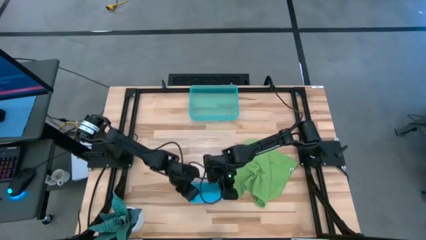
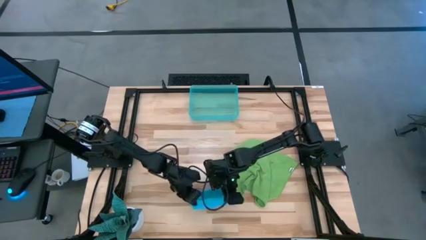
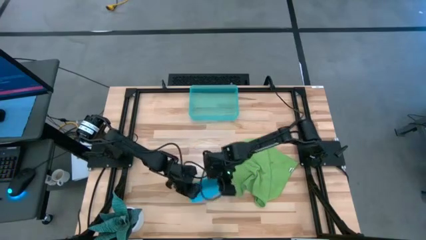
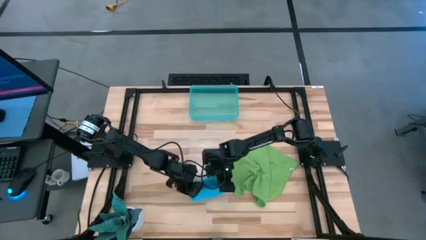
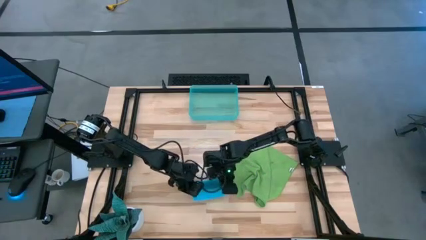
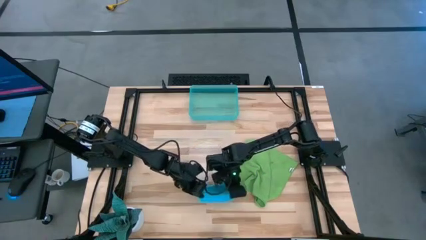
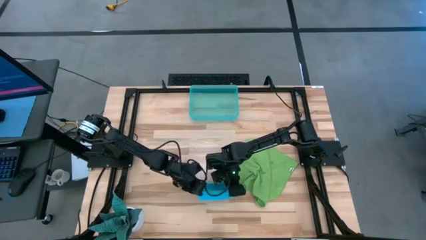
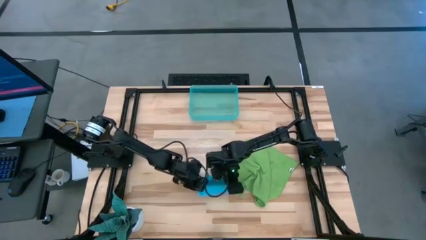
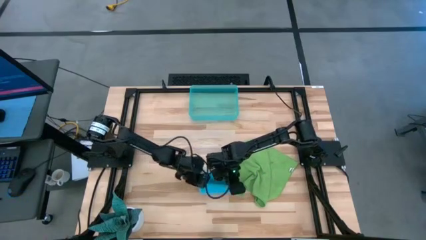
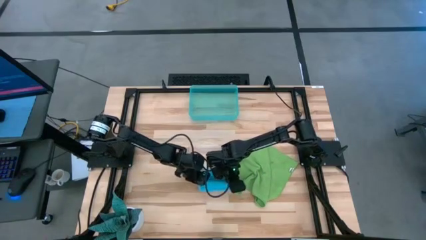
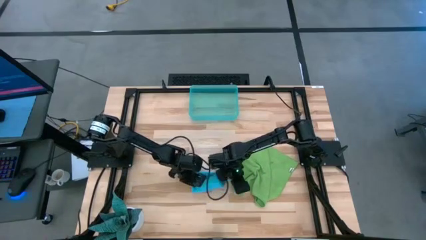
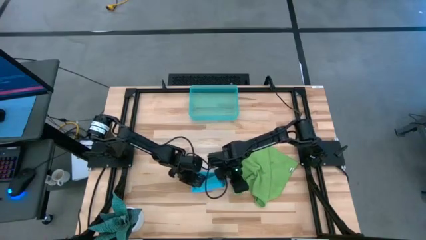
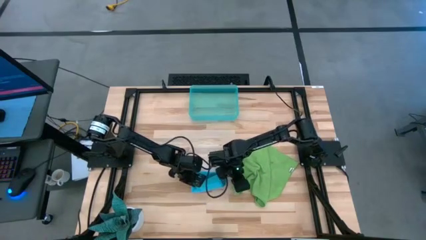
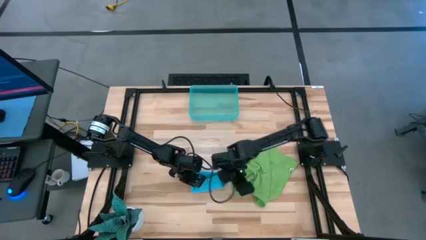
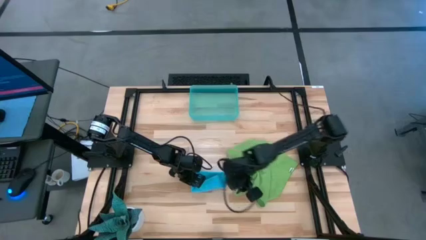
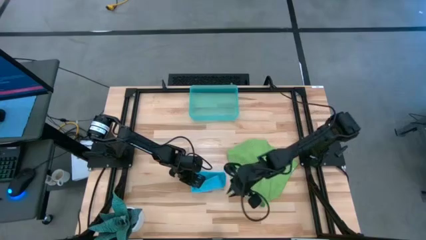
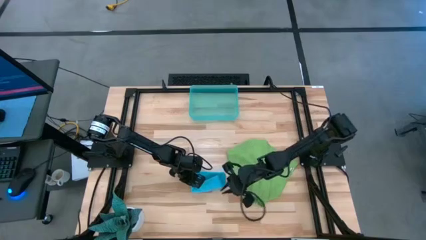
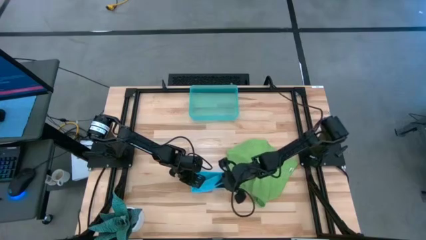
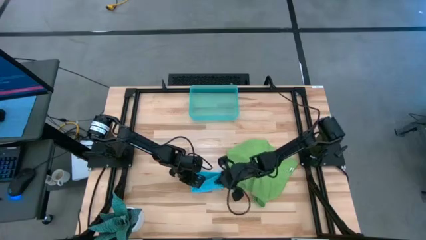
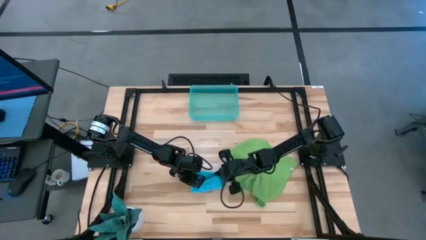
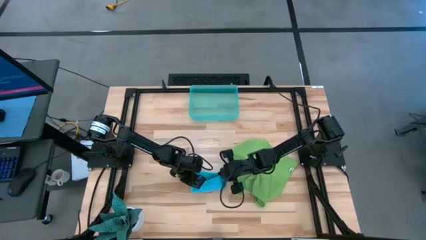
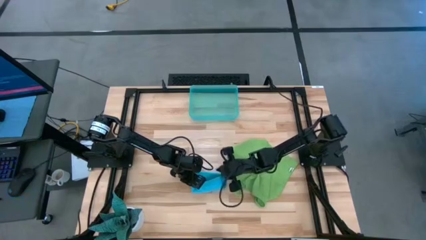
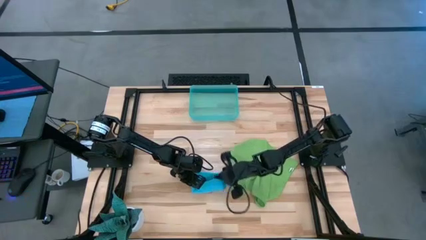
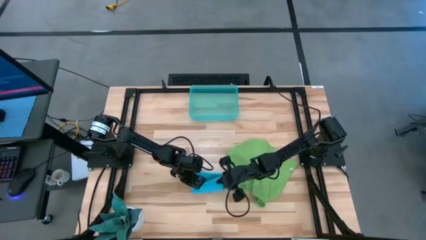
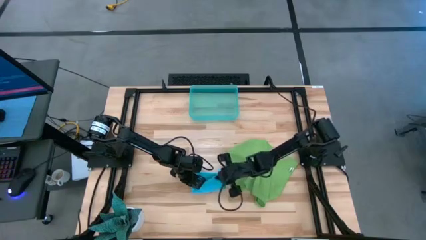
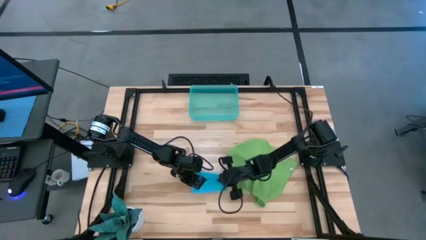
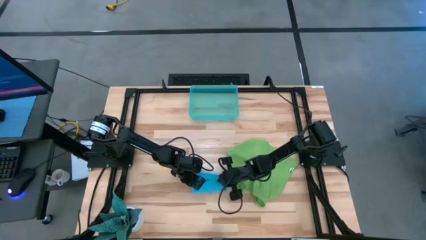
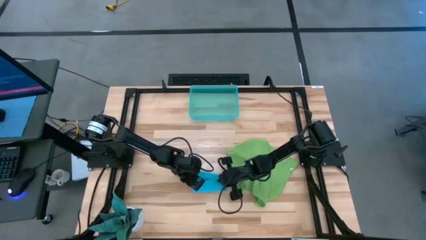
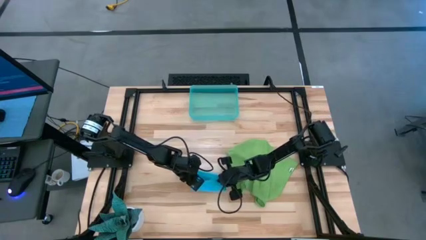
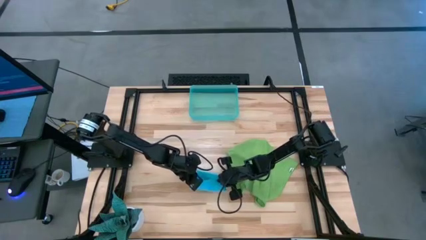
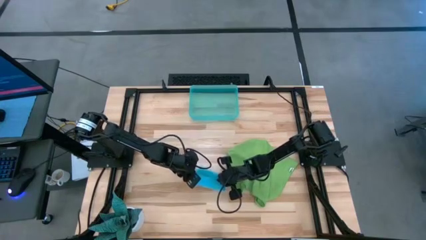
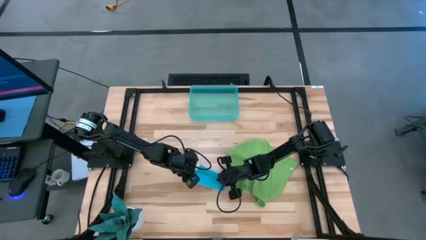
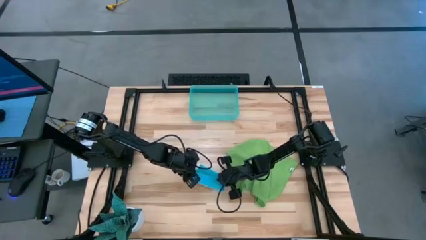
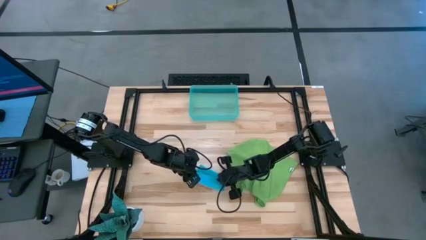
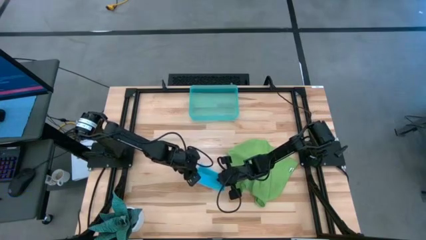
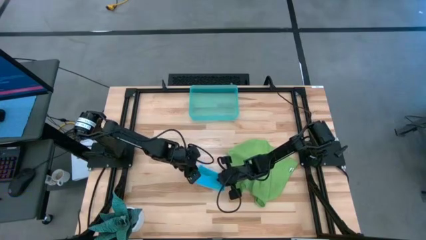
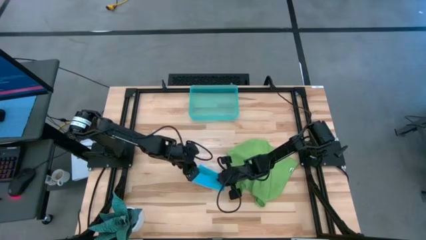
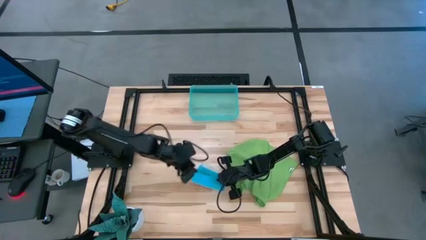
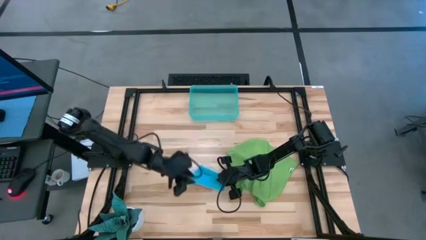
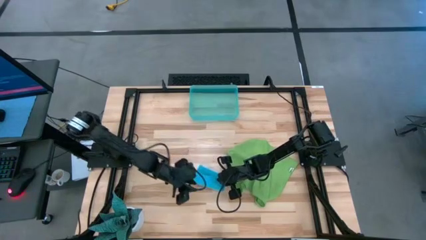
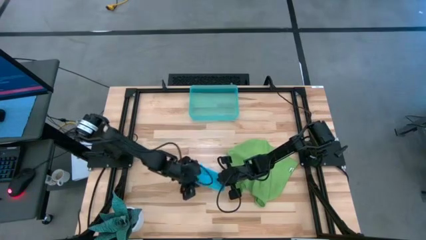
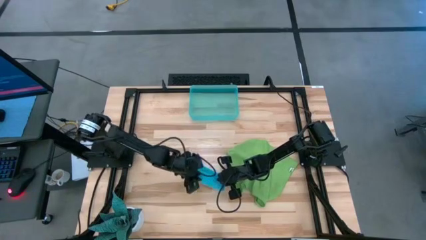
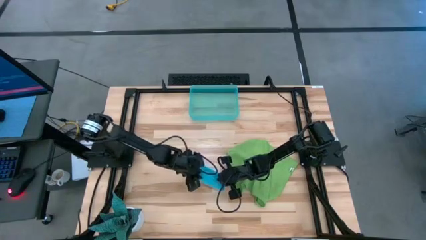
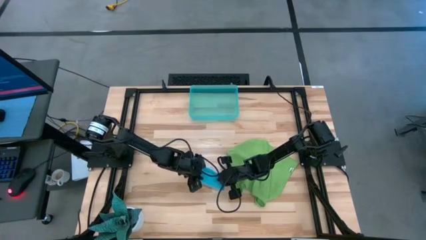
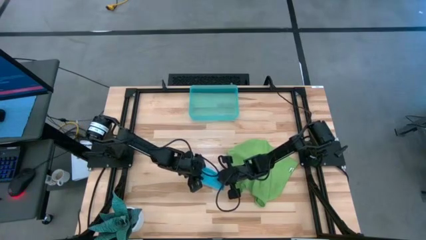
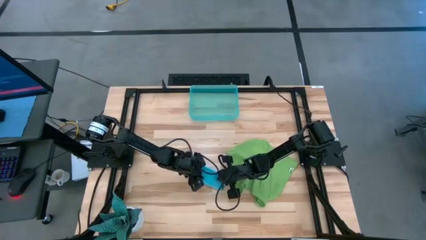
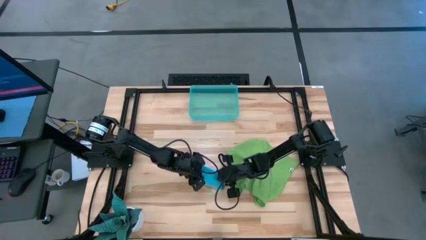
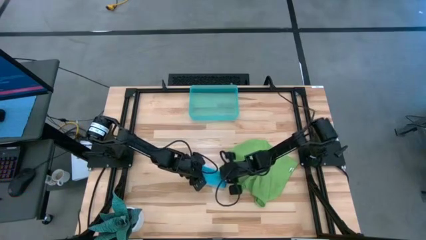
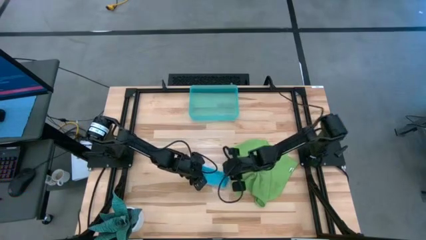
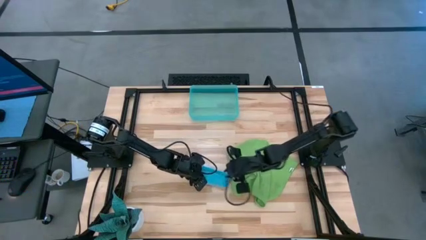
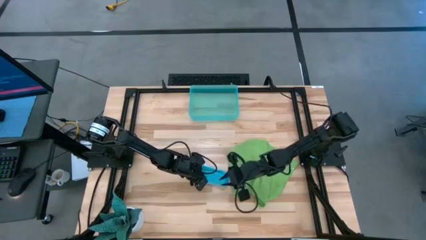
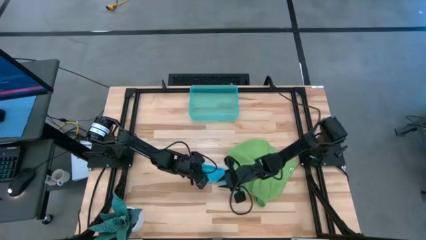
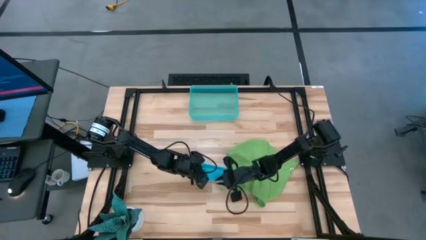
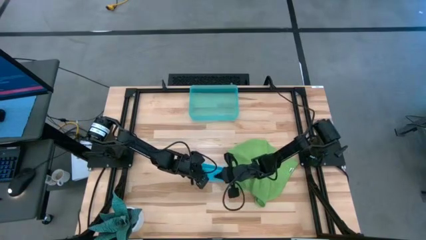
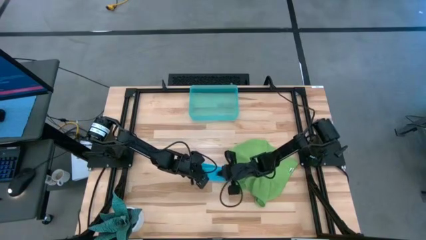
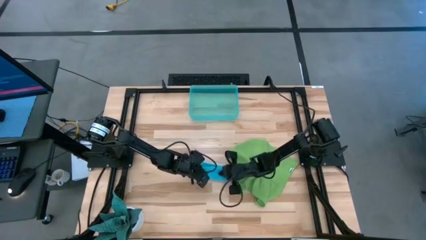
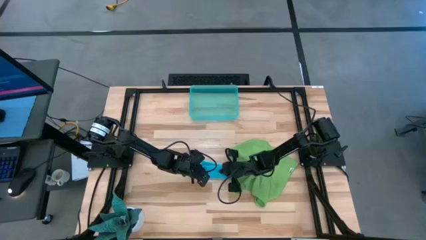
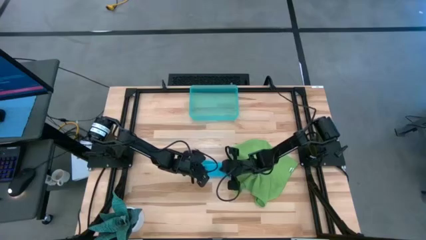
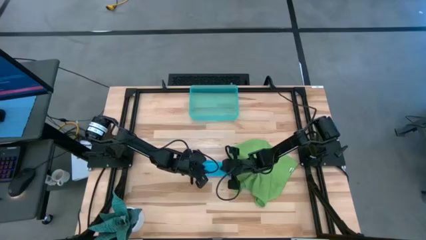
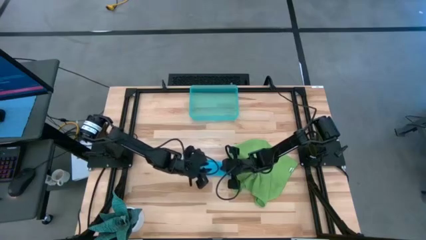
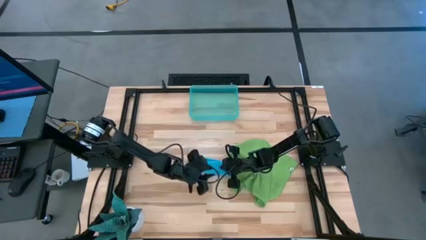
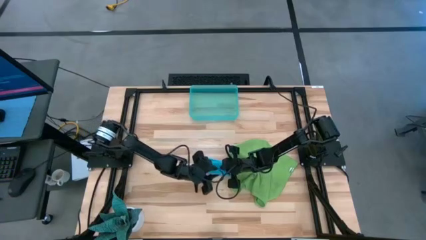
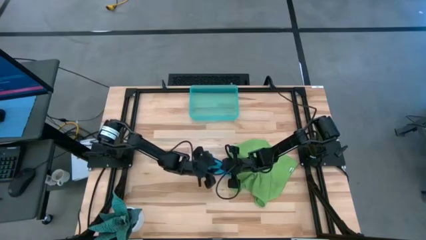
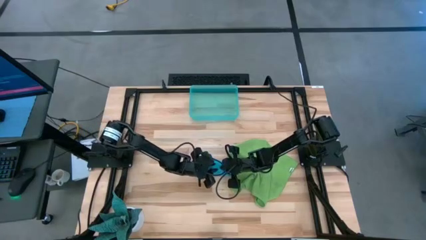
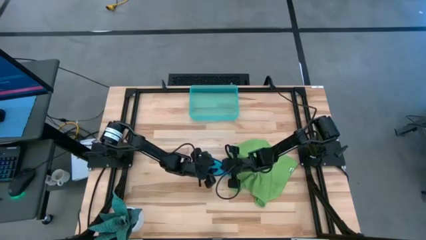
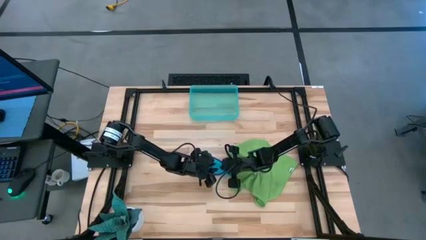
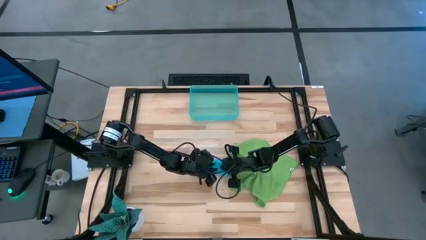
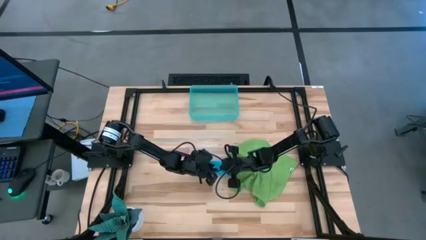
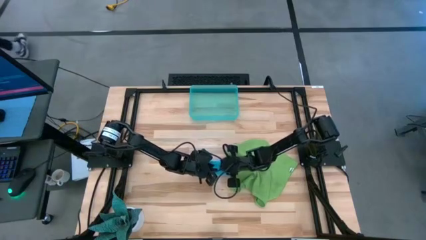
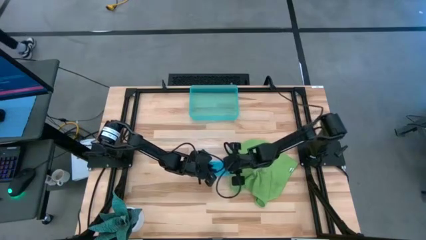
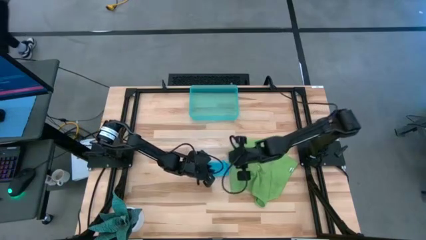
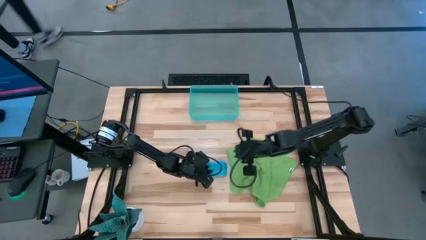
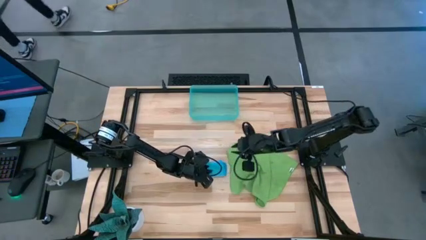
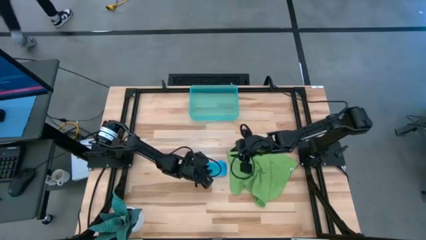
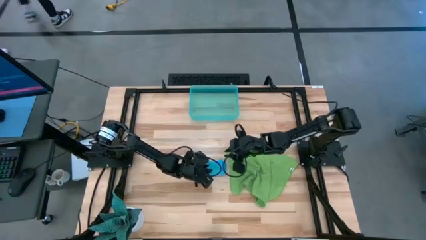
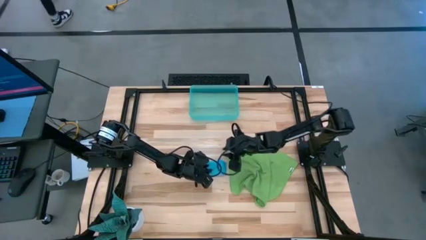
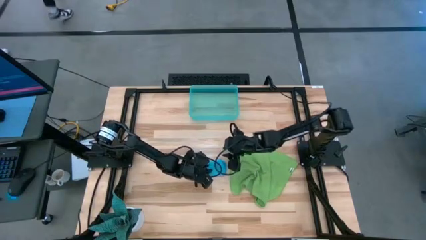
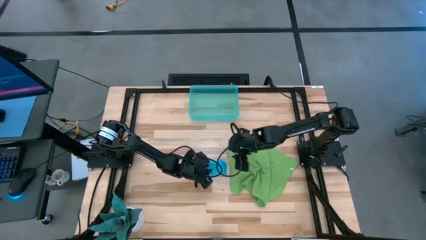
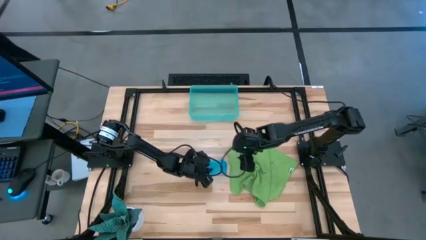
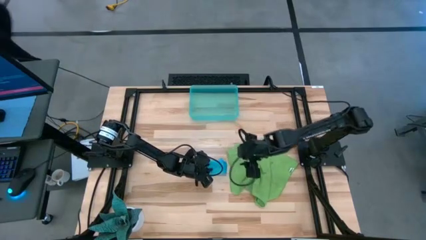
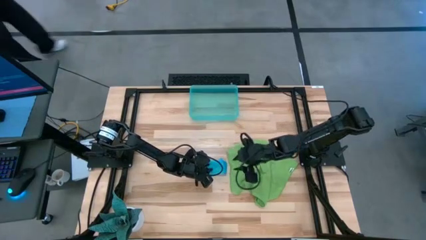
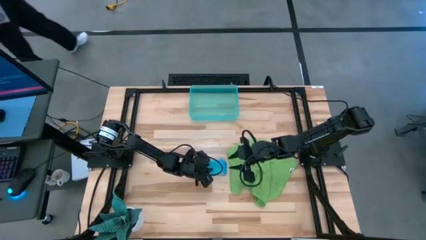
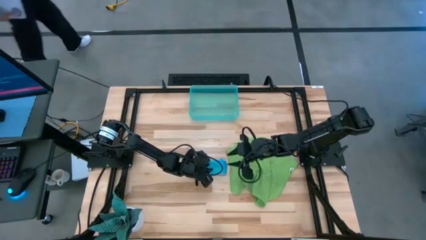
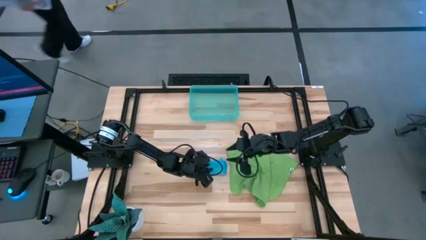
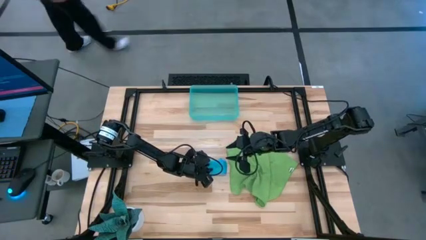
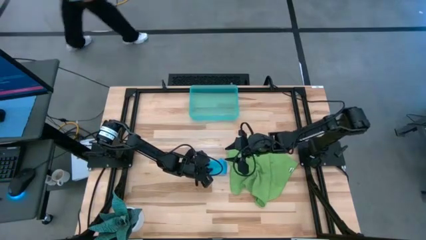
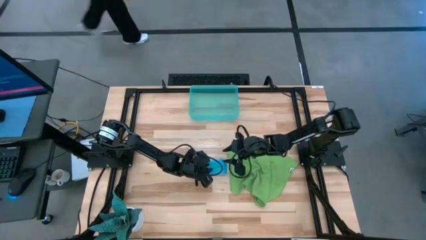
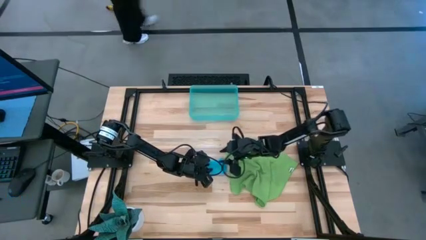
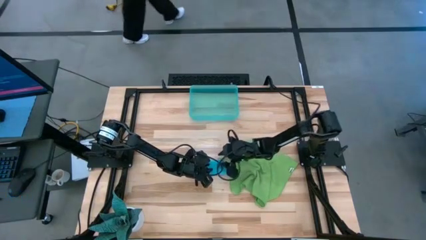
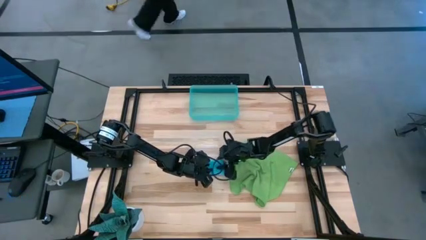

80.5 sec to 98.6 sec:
Task: Roll microfiber towels into tight, uniform cylinder then place into a basket
Roll the blue microfiber cloth
